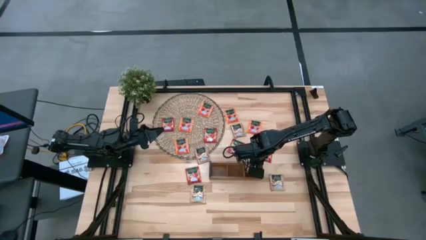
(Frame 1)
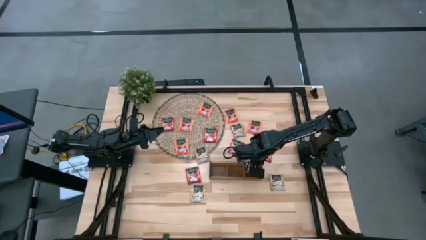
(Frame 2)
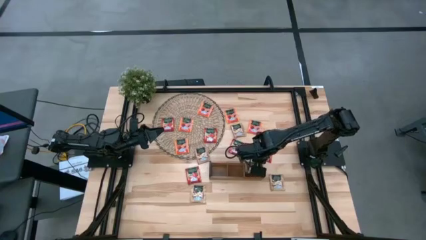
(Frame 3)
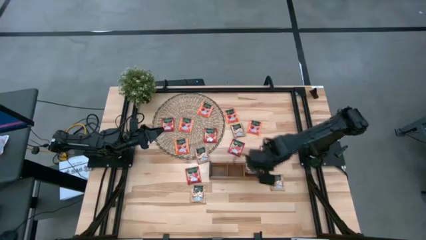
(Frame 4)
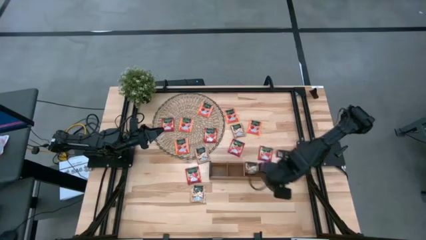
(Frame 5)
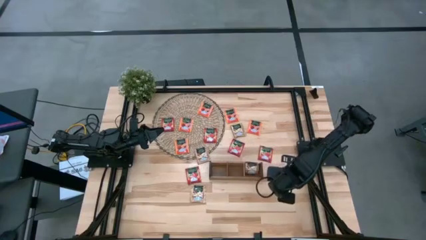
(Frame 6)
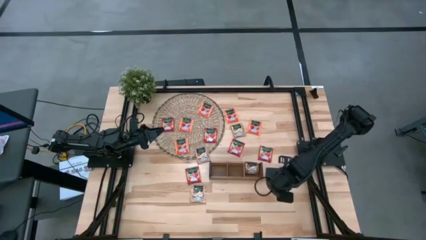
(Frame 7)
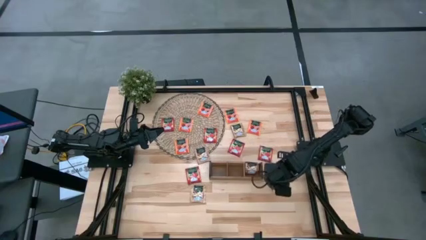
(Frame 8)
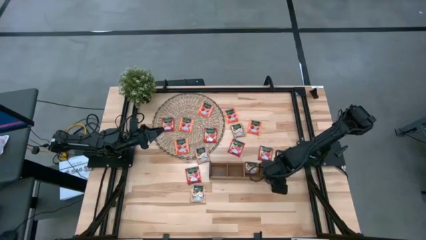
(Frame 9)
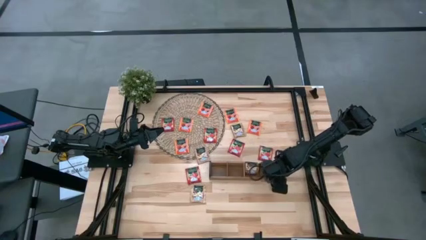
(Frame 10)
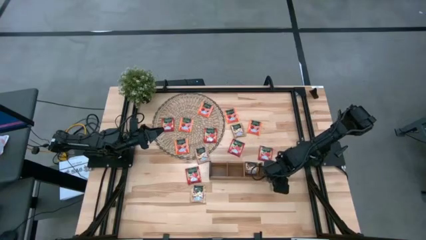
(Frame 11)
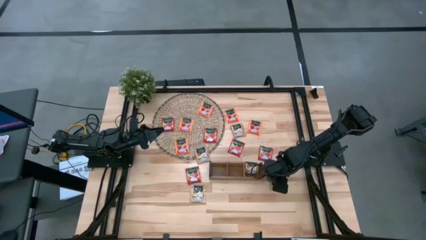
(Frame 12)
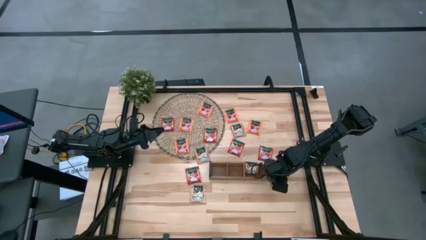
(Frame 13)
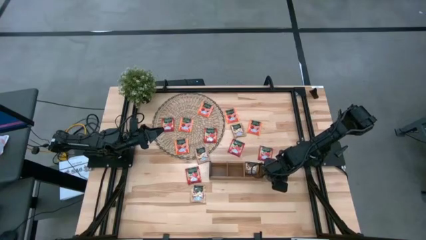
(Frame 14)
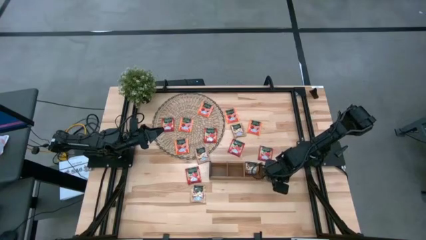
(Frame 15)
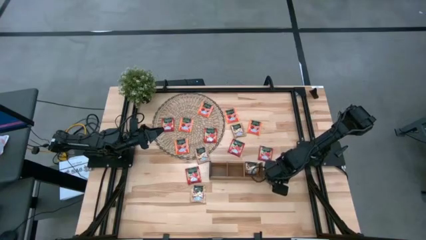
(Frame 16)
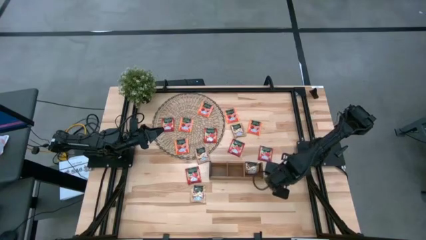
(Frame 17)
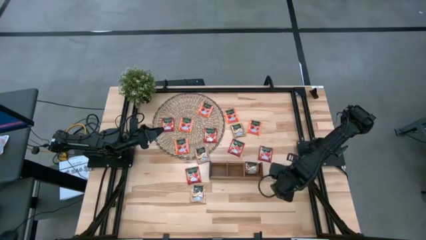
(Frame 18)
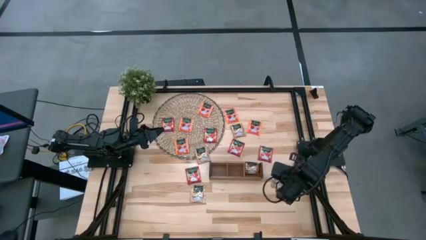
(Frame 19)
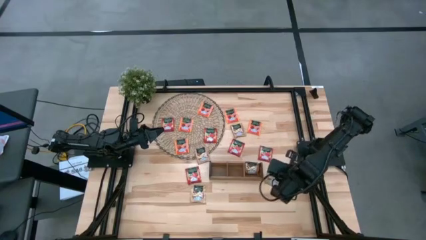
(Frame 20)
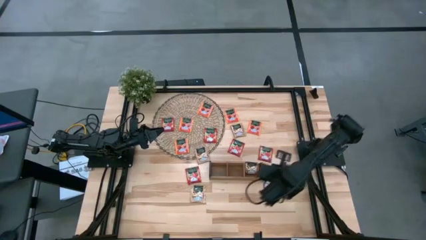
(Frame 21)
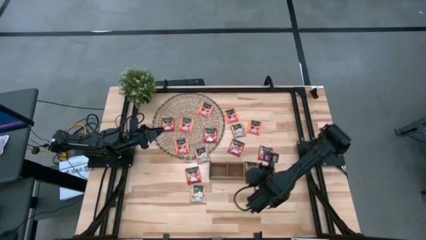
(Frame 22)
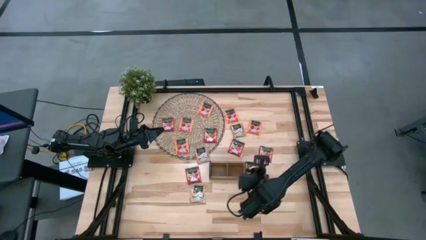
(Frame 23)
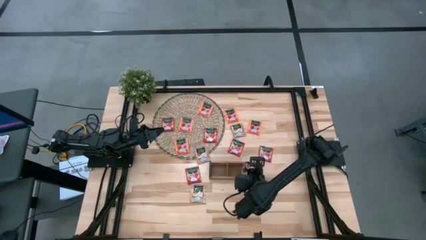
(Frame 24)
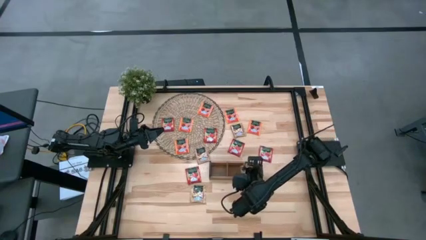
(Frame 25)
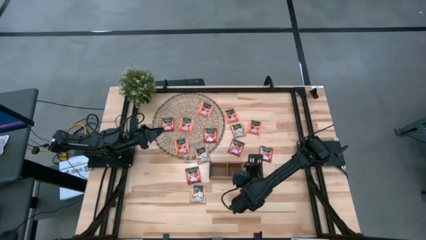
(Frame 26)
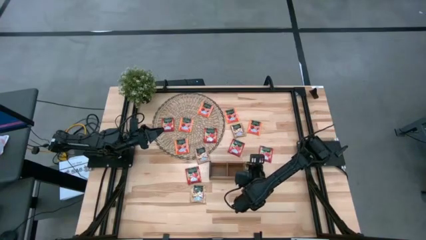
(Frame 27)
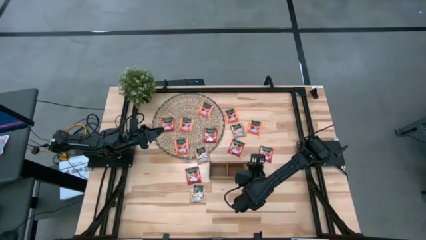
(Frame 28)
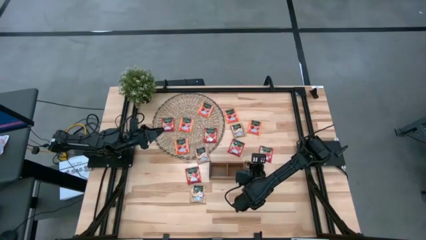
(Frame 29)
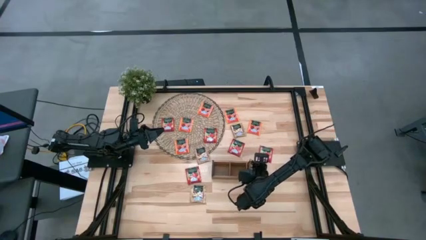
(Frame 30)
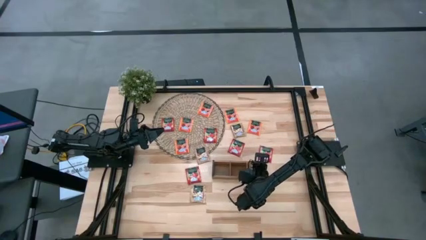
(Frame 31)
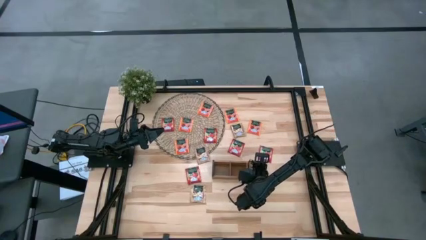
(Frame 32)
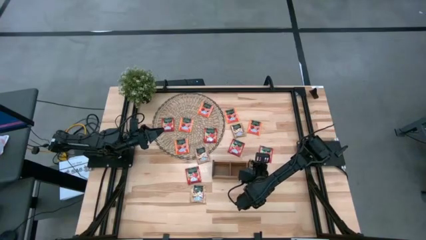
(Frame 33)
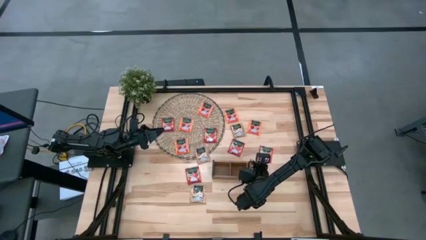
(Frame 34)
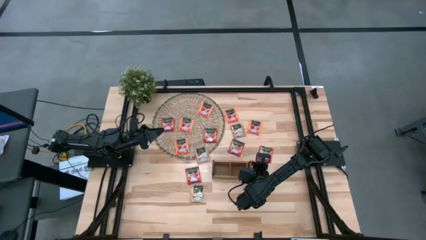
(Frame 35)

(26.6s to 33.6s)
Task: Pick & Place Tea
Put the brown tea bag into the right slot of the wooden organizer

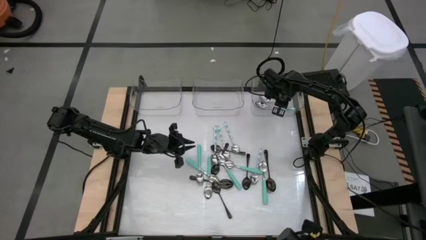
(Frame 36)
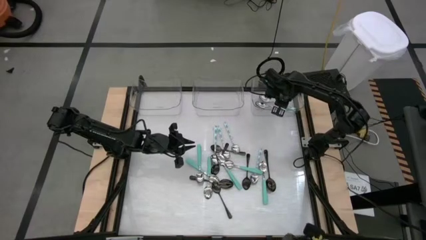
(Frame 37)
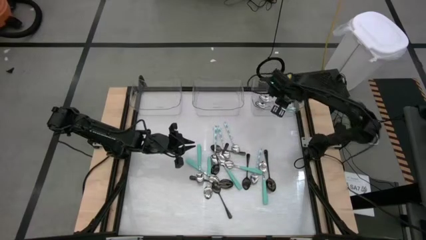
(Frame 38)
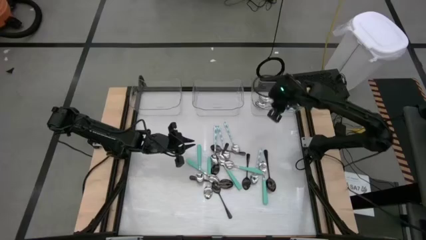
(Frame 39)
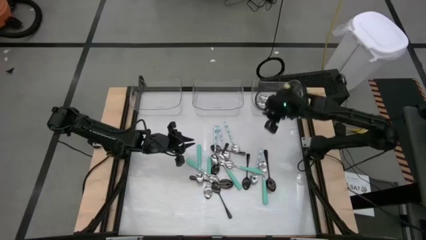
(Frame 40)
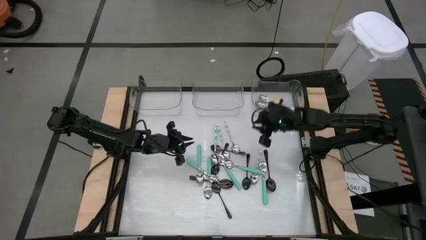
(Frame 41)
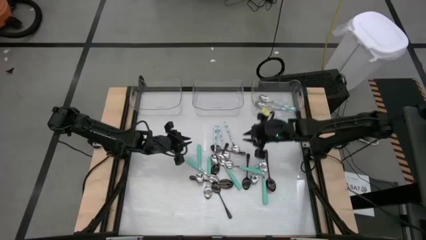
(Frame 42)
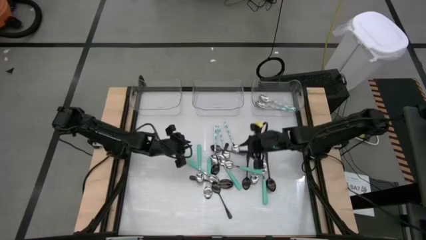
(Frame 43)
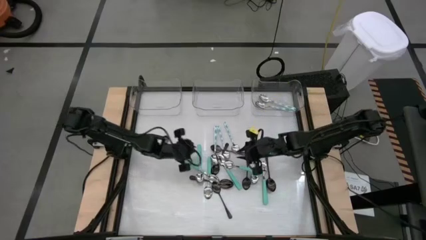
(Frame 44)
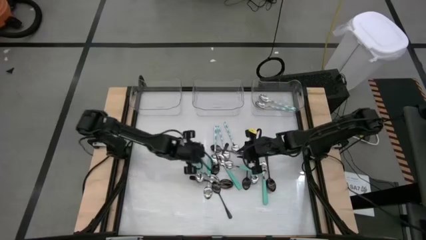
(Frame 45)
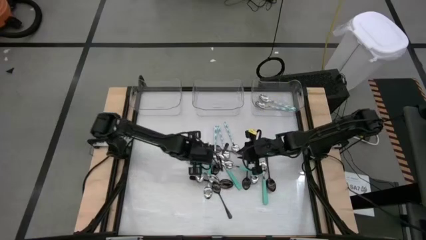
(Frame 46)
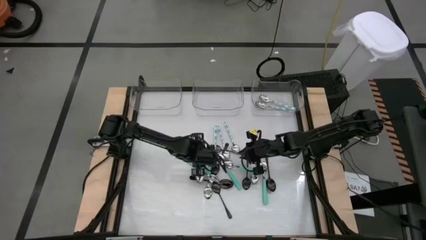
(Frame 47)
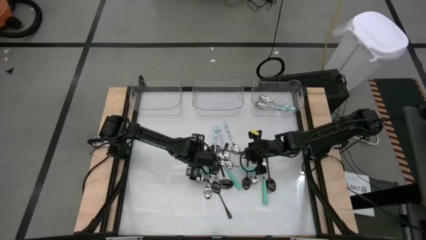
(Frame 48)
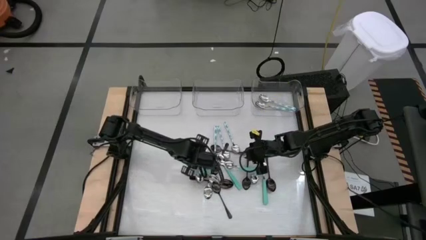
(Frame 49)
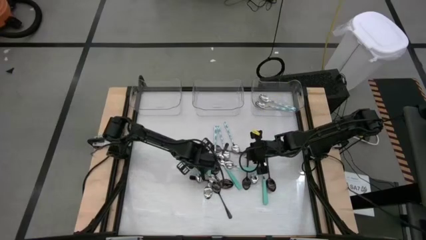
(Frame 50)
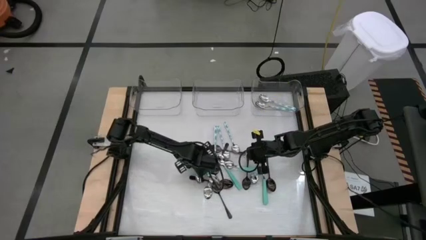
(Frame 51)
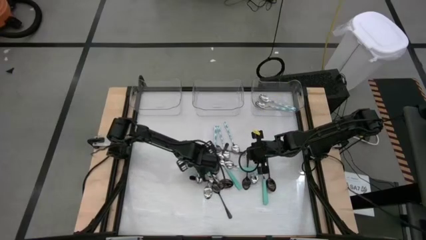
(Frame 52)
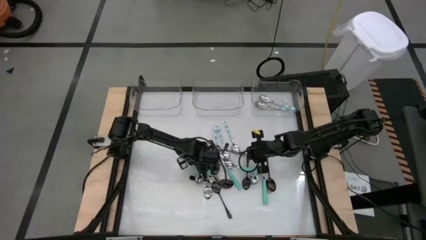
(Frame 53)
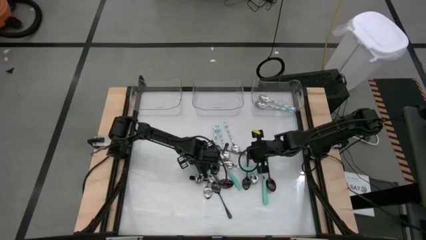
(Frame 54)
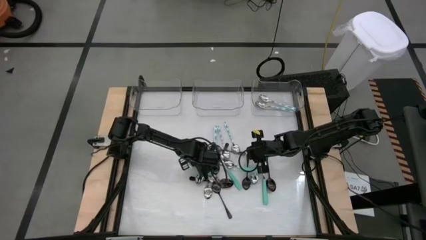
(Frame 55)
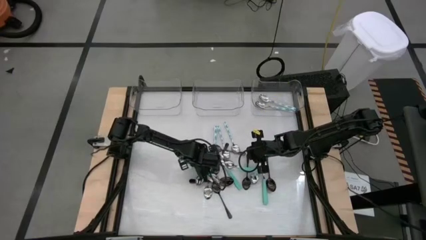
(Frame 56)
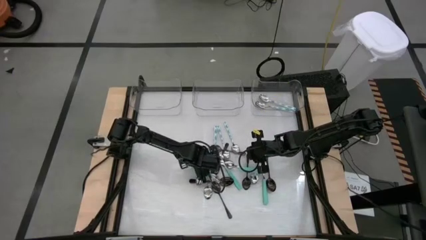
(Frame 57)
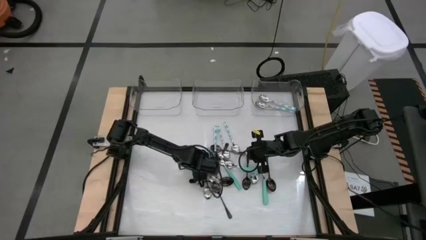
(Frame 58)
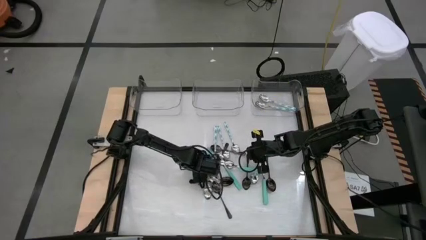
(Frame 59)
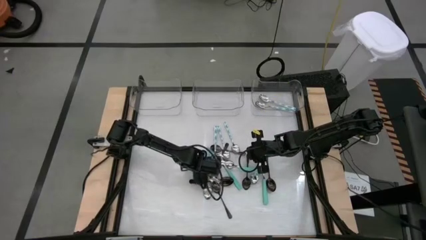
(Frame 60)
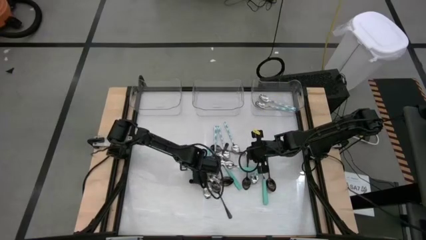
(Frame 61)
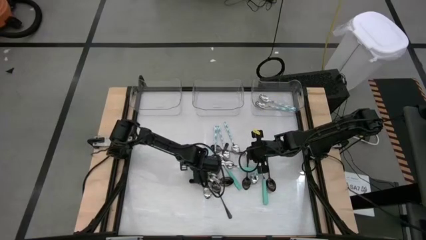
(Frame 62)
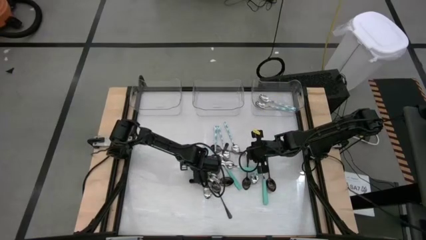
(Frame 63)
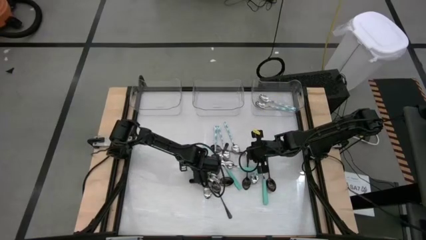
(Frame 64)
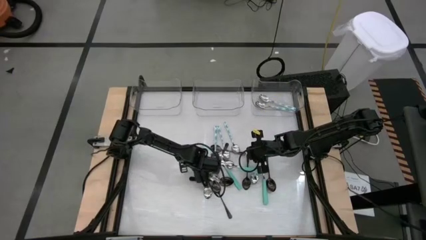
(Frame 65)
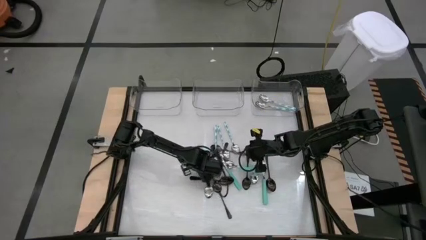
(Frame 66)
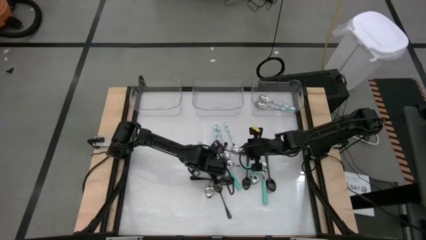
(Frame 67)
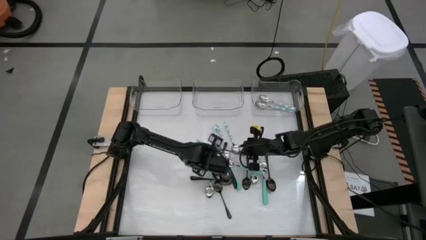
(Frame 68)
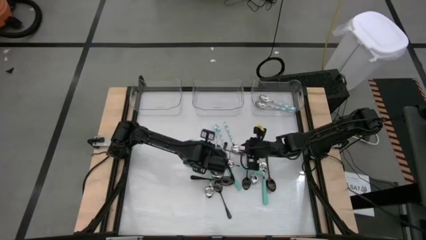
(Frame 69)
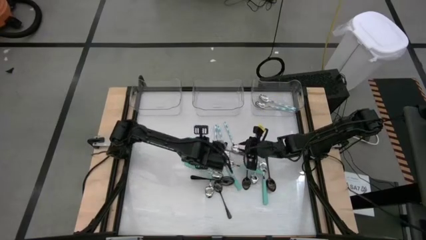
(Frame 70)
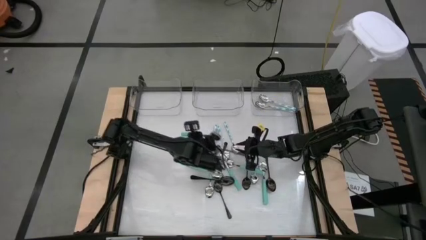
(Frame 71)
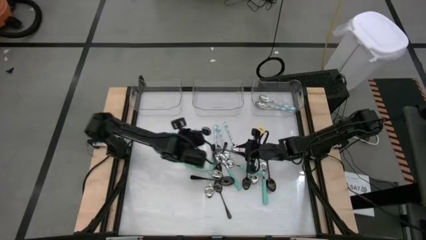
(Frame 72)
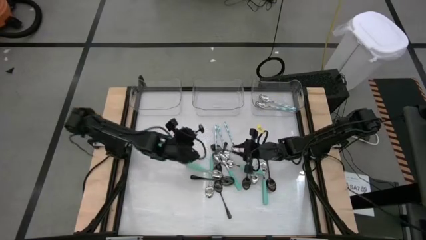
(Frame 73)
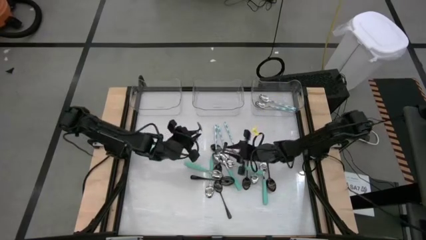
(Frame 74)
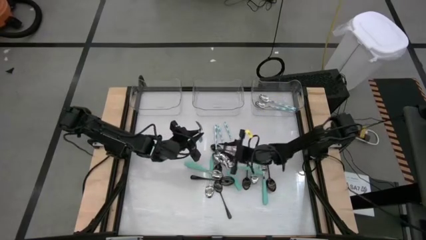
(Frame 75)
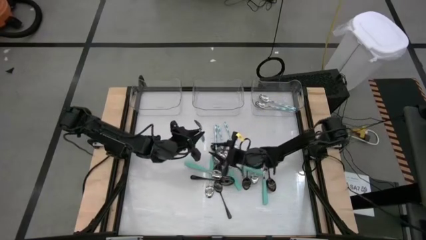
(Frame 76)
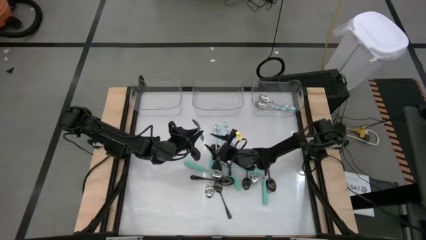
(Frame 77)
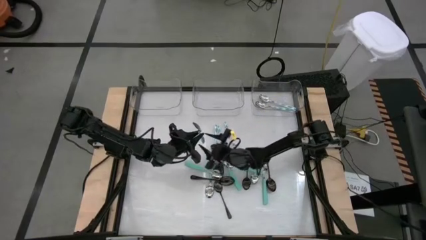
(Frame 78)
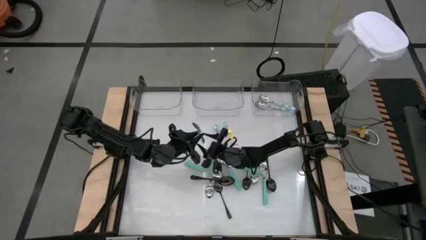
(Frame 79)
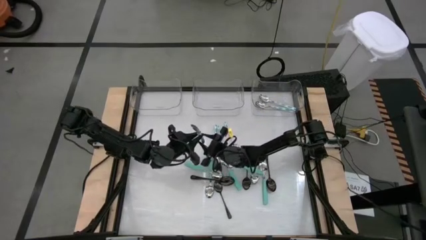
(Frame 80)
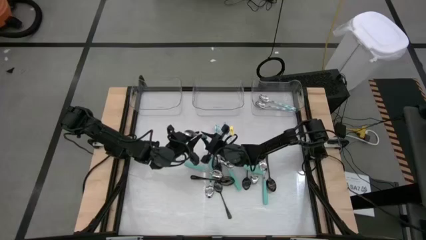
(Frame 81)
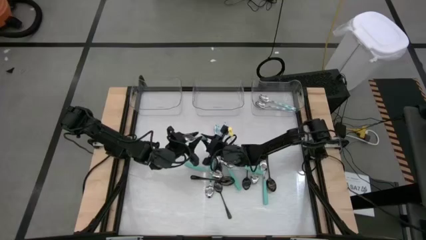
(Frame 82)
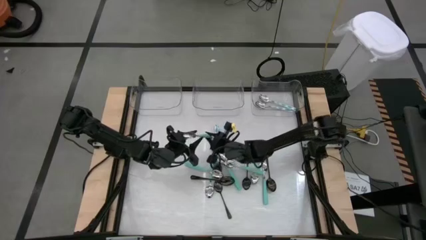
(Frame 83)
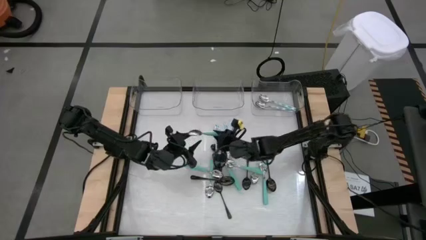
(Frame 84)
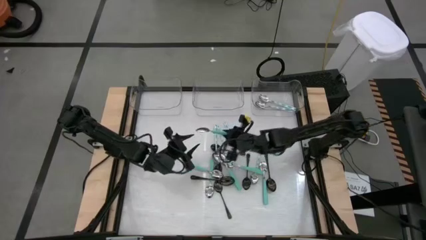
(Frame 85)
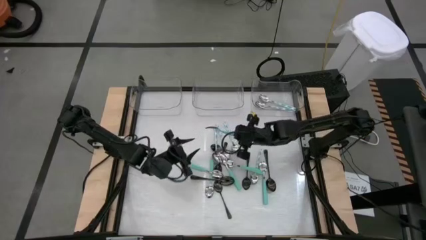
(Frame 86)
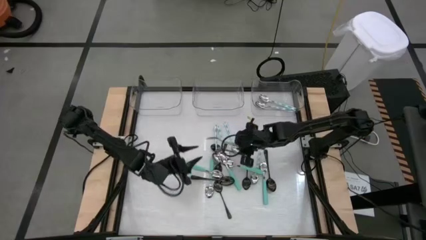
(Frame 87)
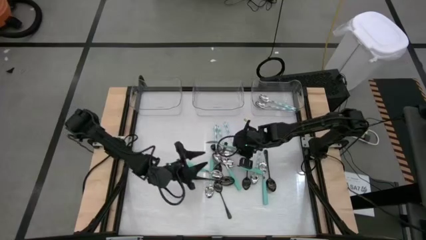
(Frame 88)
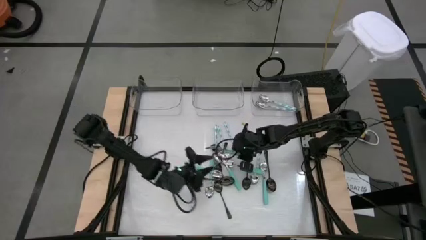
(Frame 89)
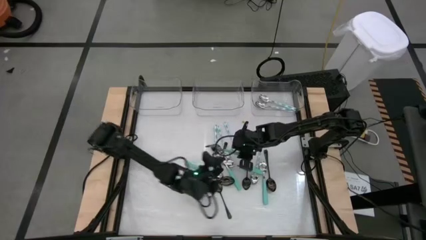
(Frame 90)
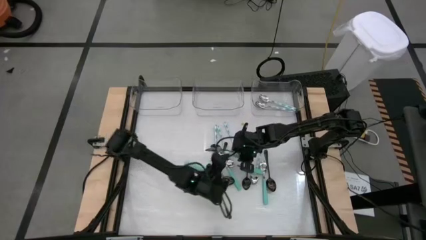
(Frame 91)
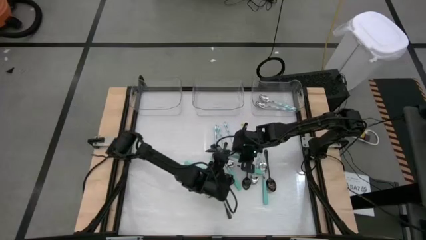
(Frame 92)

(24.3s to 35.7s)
Task: Sort silverware by color (type)
Put the green spoon into the center transparent bin
